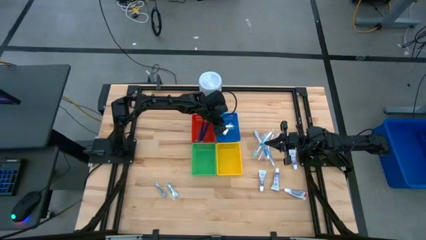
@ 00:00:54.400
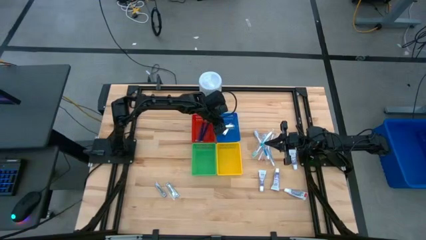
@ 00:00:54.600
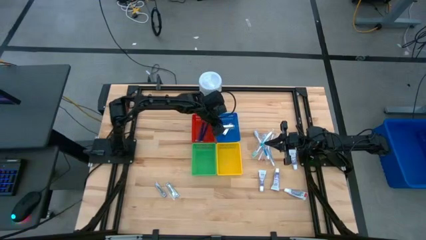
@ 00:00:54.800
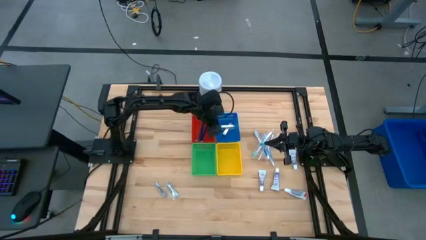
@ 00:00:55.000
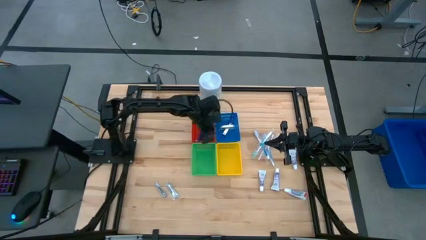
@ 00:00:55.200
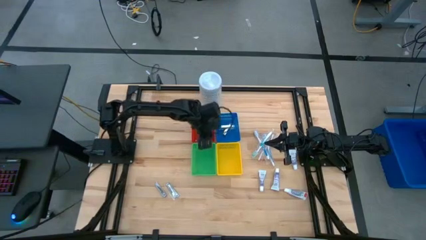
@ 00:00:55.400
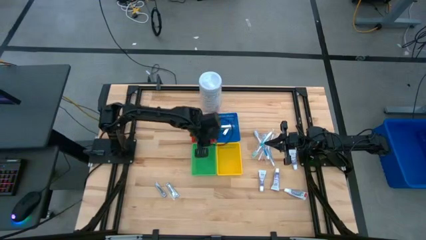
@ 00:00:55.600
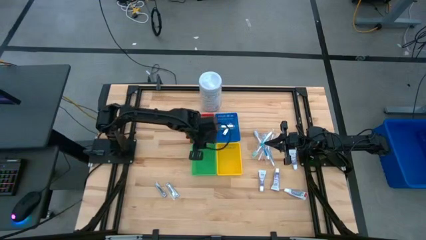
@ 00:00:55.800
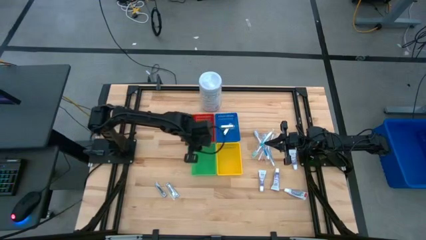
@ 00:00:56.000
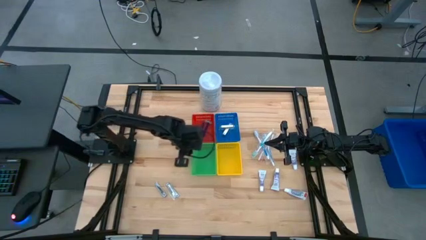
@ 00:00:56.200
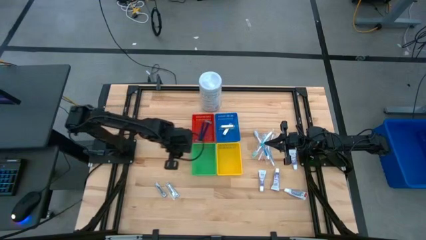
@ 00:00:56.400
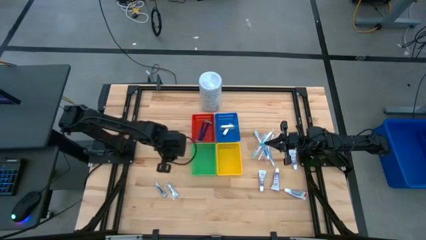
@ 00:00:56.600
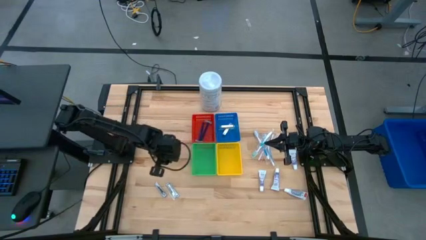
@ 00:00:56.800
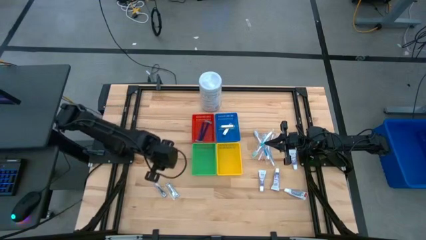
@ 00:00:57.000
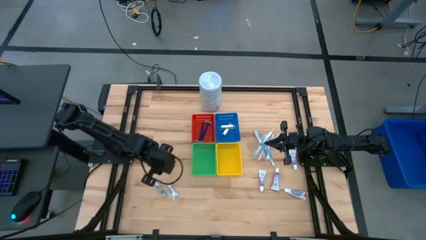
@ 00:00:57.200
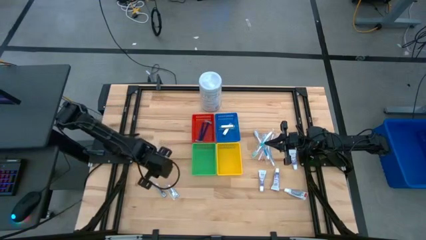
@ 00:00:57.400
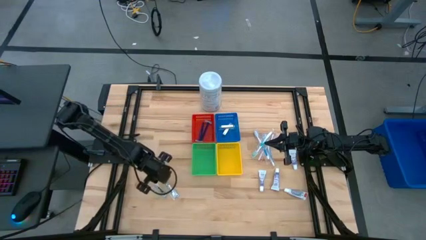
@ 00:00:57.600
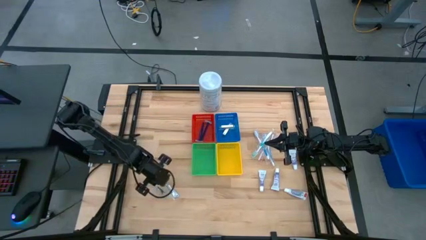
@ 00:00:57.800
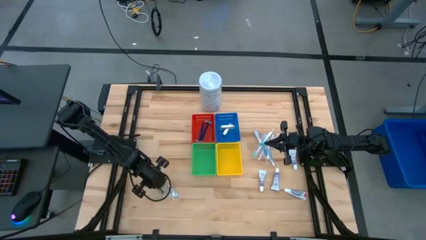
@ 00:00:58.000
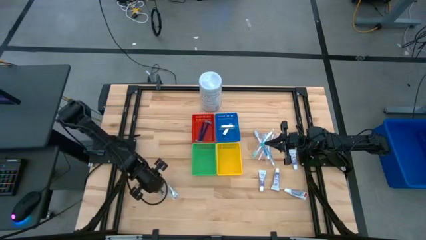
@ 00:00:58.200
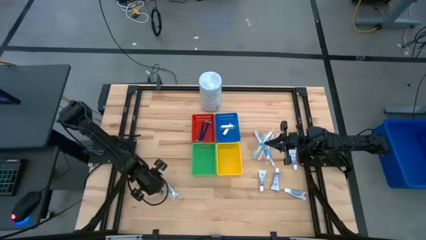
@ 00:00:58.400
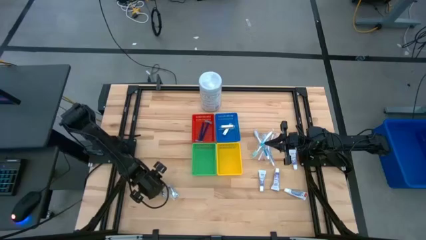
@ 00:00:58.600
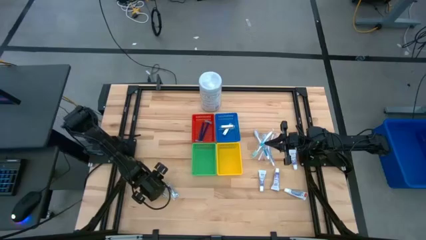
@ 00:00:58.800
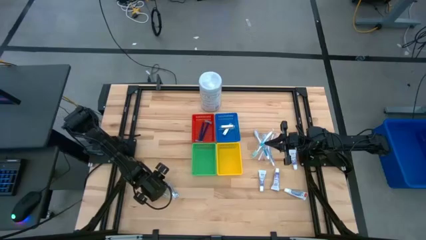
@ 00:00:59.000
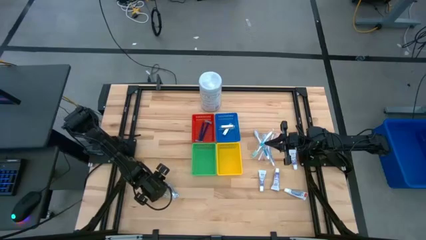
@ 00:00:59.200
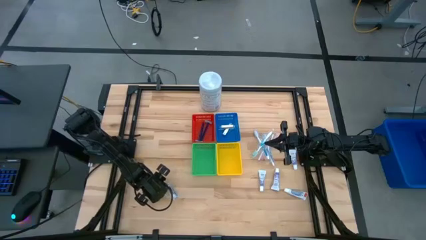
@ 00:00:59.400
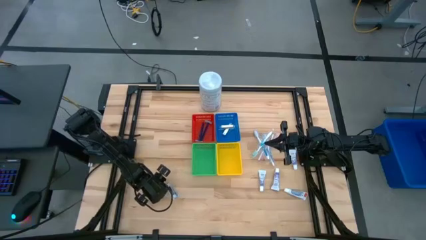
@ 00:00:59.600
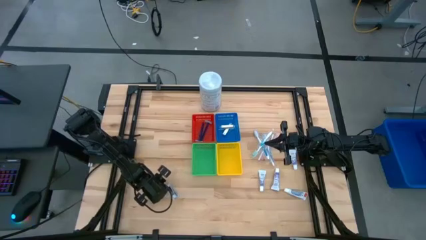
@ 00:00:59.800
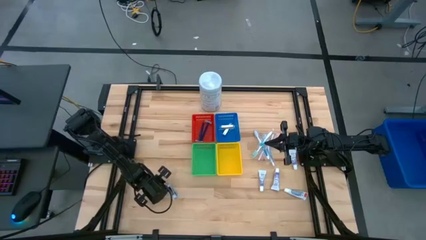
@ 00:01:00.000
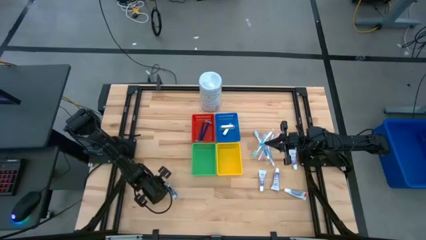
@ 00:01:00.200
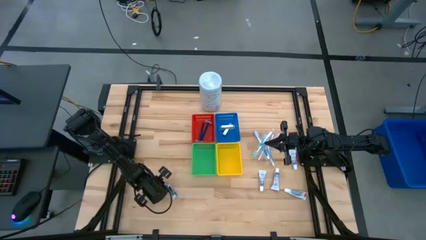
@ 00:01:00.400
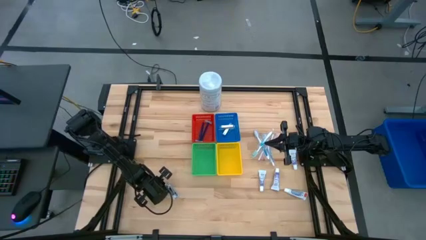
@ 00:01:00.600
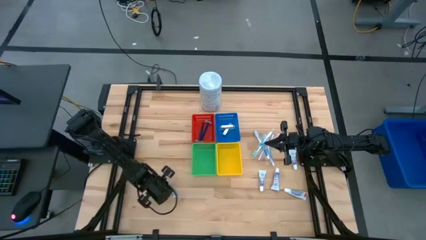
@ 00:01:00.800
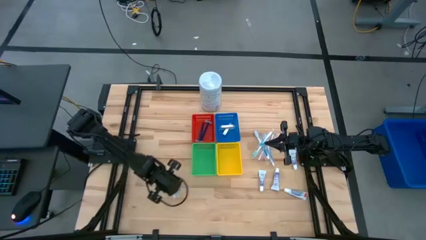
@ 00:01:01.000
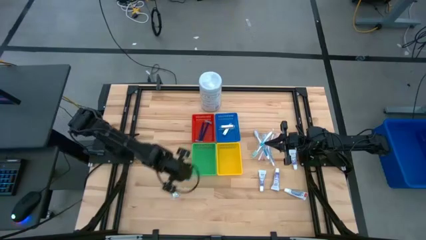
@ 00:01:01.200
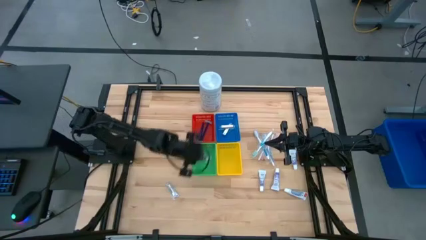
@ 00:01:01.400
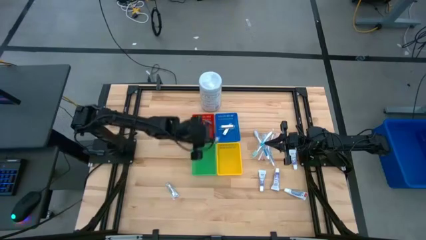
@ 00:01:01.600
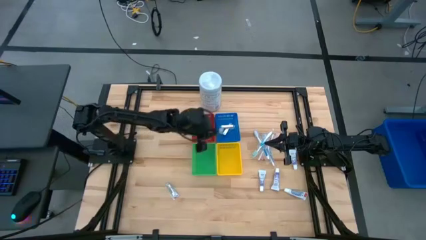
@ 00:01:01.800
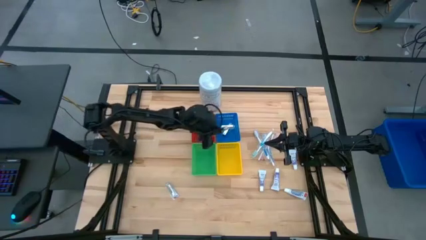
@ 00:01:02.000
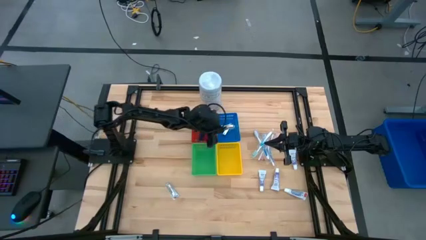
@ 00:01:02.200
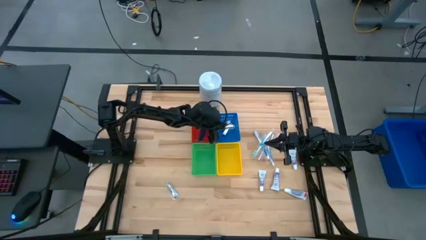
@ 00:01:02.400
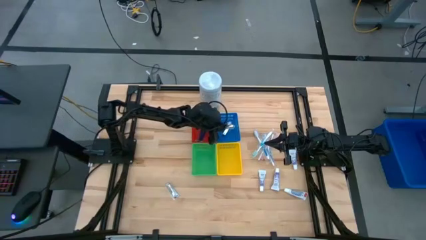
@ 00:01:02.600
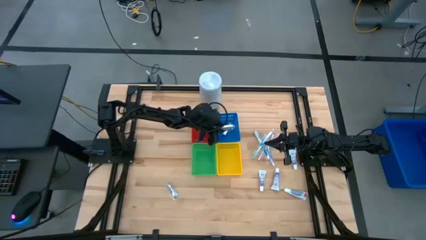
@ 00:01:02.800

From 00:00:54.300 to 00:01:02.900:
Task: Pick & Place Travel size toiletries
Put the silver nail cutter into the blue bin

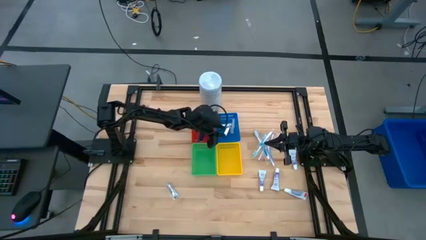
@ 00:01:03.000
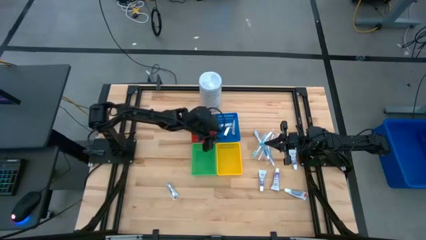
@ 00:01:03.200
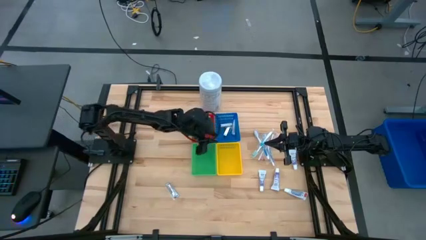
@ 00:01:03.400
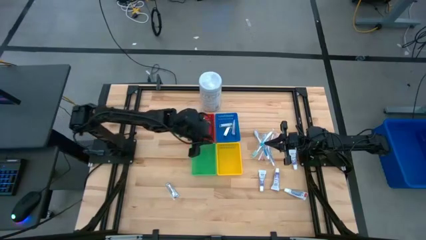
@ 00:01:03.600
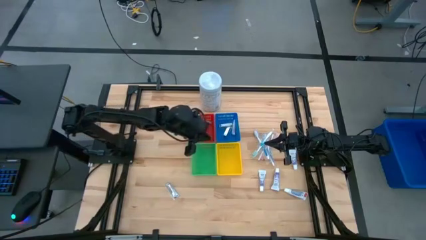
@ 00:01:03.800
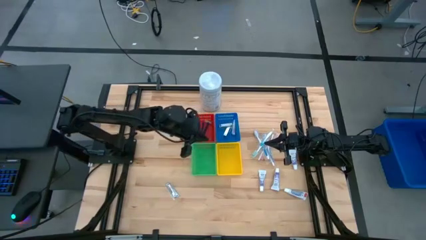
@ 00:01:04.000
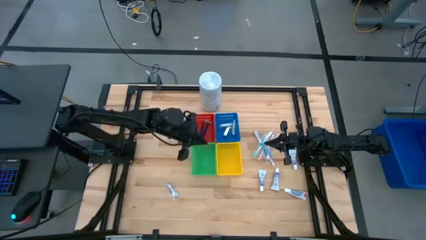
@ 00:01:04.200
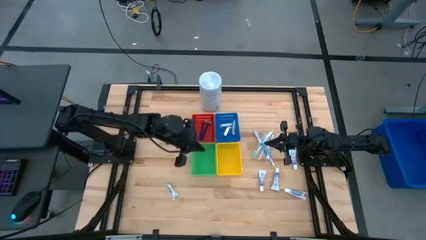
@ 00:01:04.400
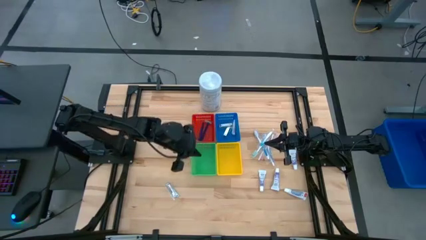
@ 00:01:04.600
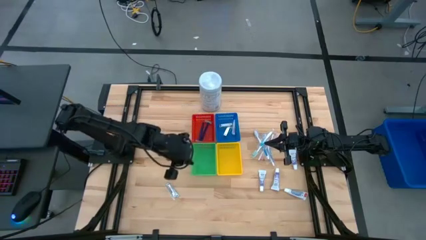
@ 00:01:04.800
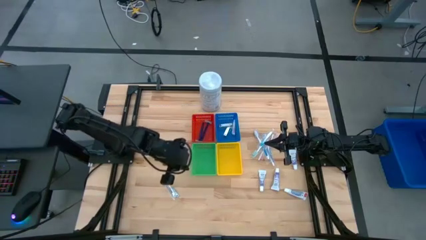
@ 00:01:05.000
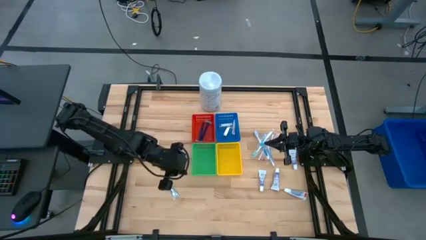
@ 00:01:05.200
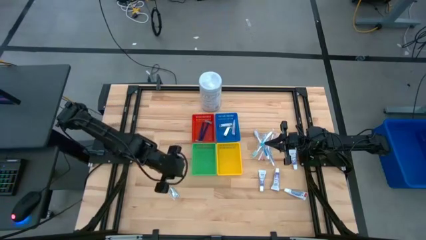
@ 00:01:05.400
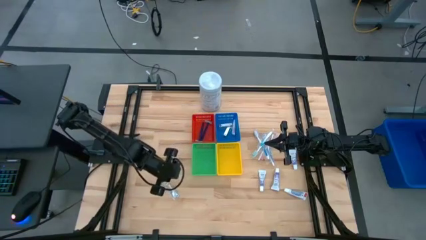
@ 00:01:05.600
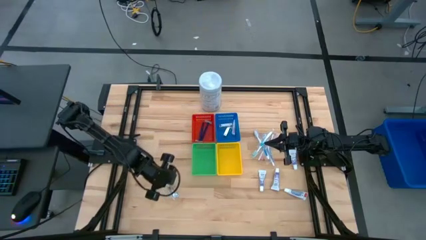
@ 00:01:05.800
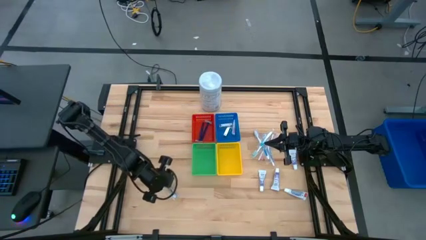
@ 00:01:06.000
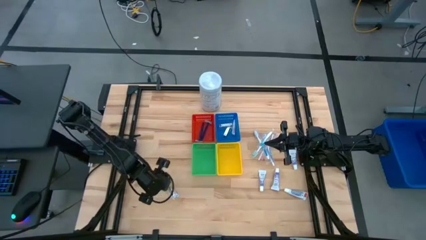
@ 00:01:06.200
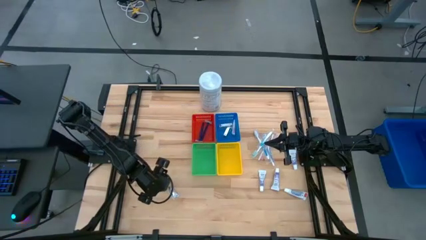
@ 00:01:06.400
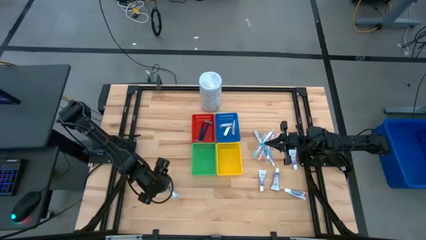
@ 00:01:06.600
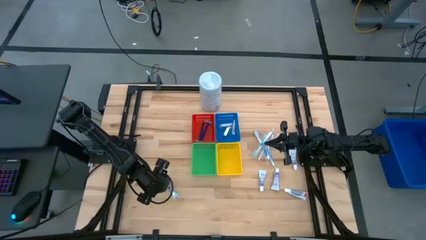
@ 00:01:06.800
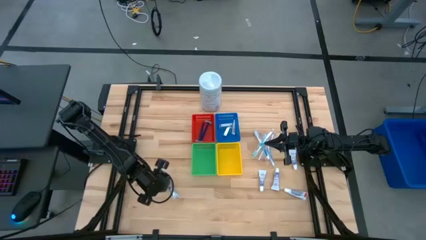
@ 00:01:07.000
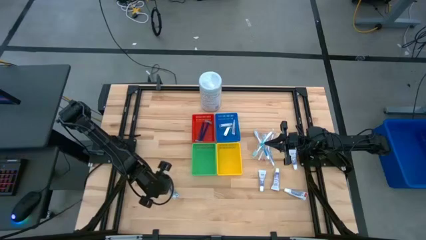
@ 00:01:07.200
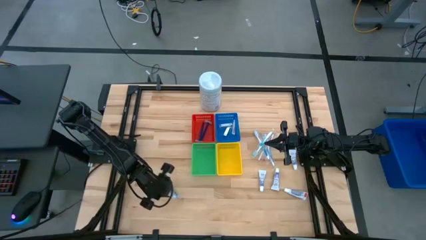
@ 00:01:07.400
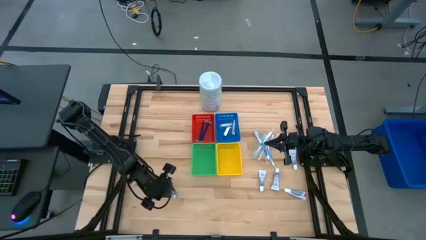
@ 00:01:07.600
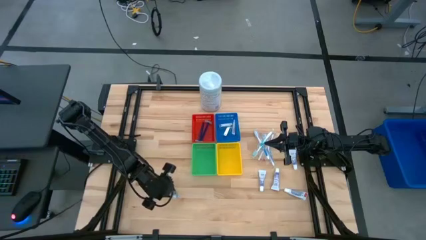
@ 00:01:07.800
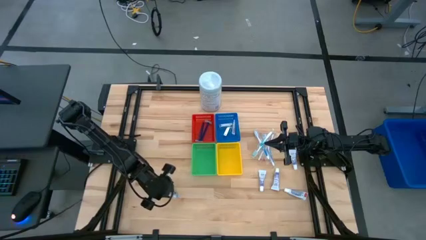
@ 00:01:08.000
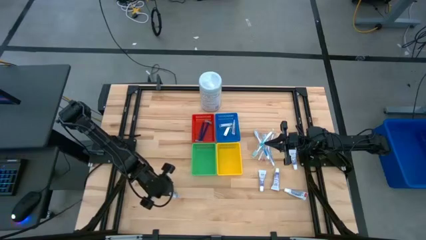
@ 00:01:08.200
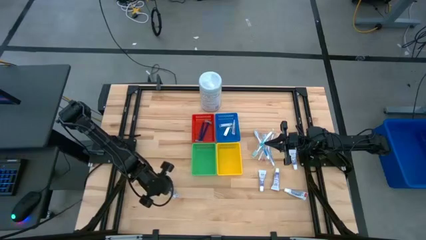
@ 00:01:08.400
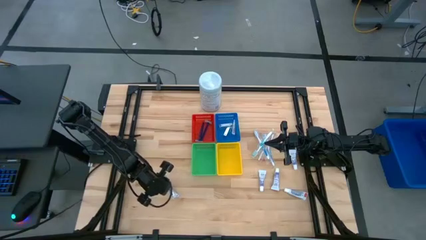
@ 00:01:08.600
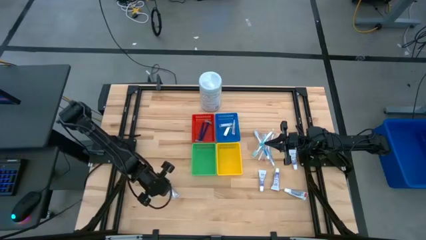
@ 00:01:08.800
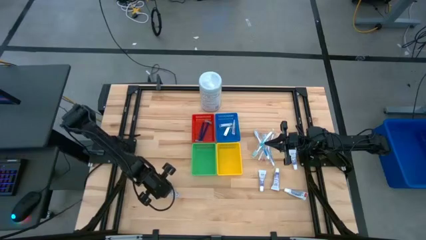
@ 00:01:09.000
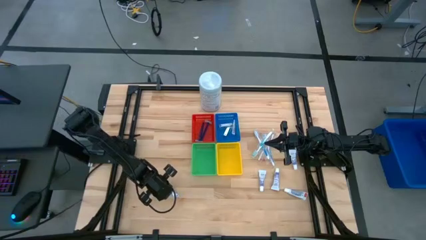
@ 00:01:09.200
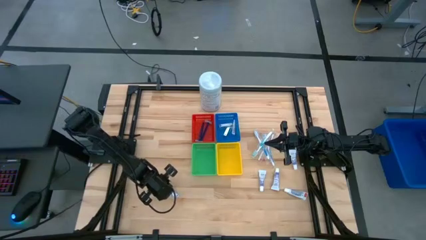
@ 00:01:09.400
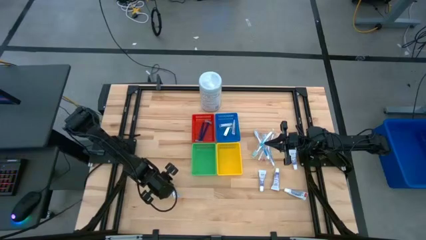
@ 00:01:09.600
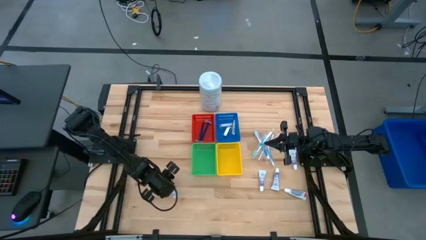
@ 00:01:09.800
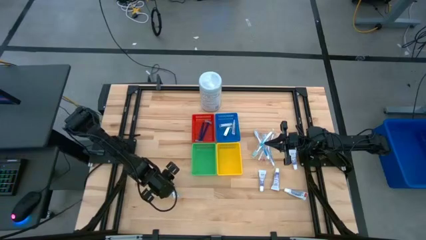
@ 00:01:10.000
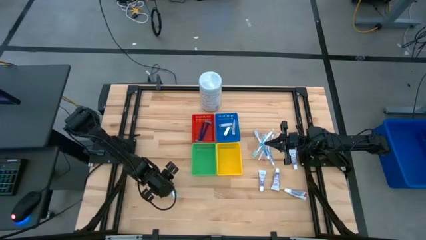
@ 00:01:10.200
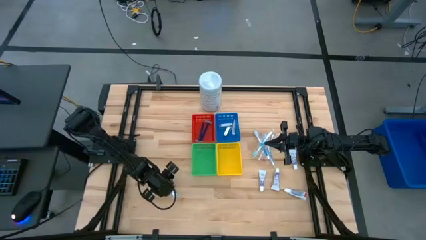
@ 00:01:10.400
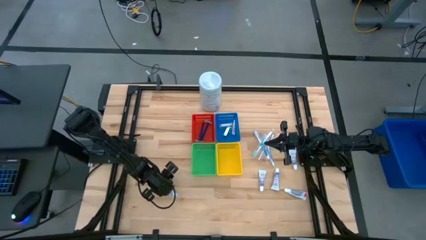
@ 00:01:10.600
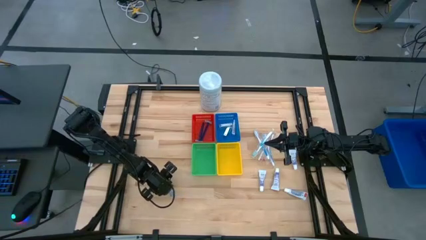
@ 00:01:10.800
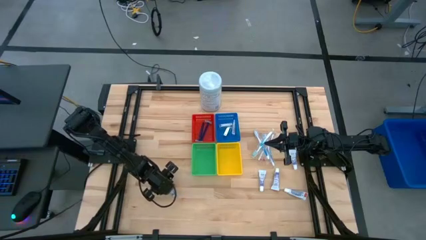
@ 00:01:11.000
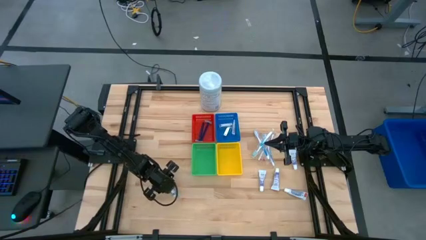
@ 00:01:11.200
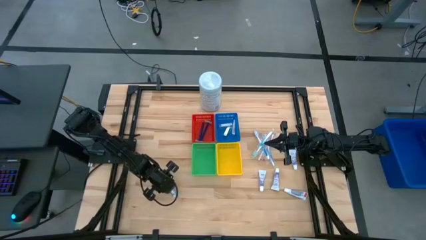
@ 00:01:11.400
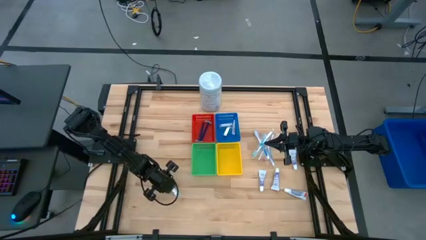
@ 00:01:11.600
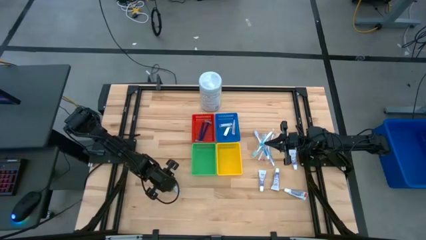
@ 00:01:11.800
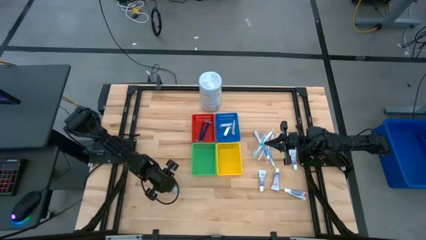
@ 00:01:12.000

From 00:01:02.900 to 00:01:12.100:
Put the silver nail cutter into the blue bin
